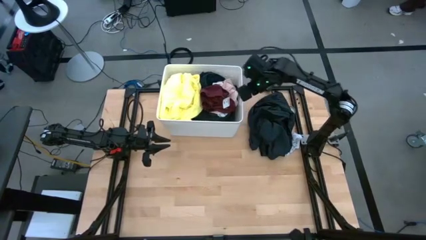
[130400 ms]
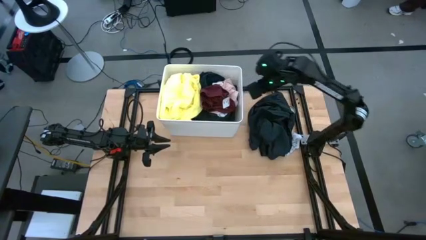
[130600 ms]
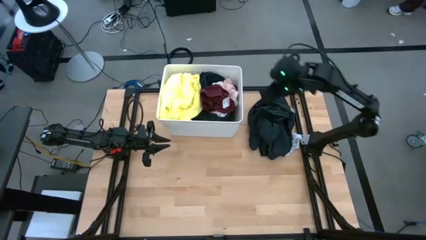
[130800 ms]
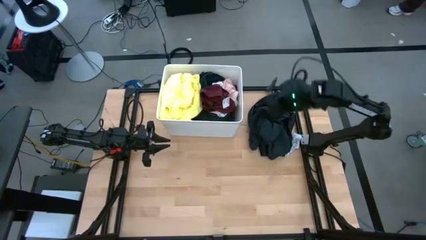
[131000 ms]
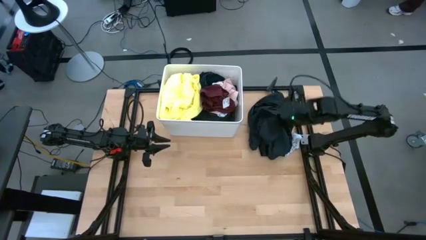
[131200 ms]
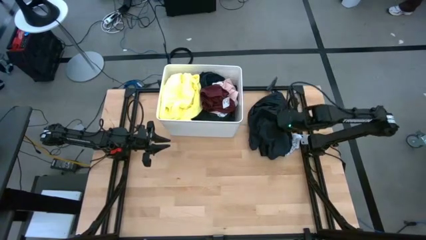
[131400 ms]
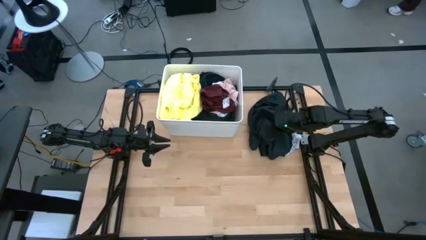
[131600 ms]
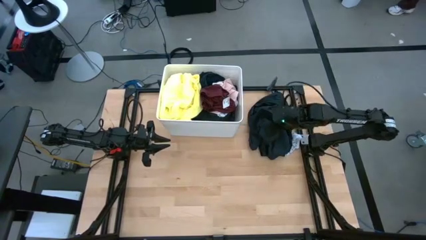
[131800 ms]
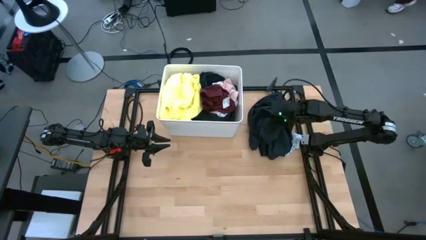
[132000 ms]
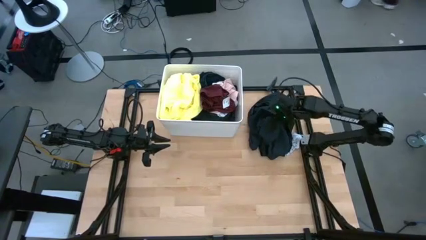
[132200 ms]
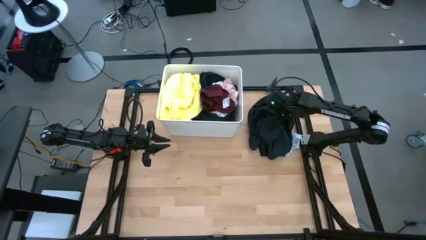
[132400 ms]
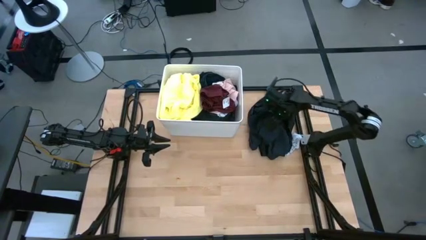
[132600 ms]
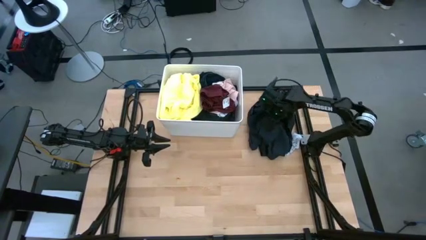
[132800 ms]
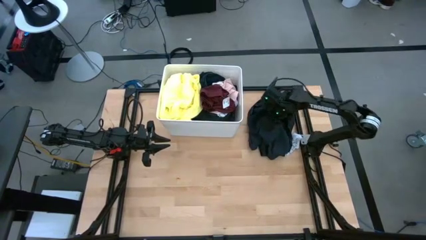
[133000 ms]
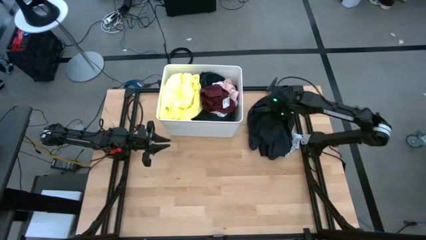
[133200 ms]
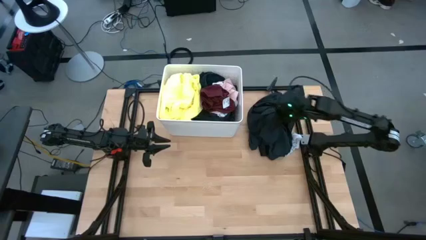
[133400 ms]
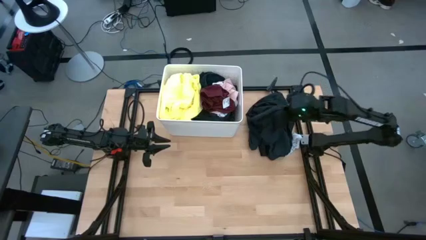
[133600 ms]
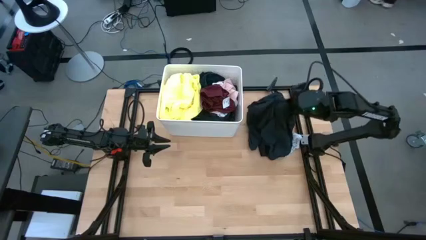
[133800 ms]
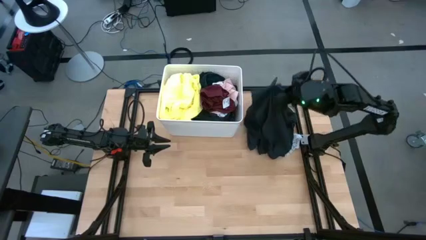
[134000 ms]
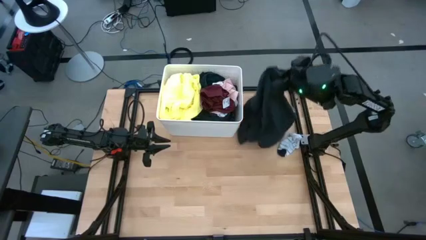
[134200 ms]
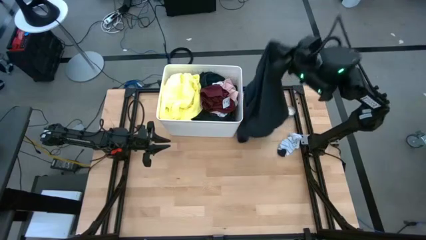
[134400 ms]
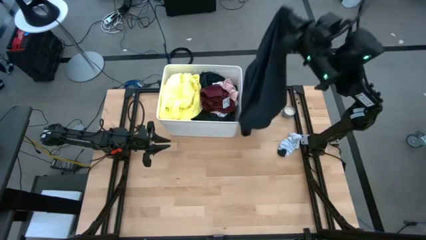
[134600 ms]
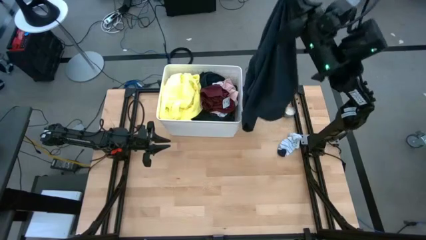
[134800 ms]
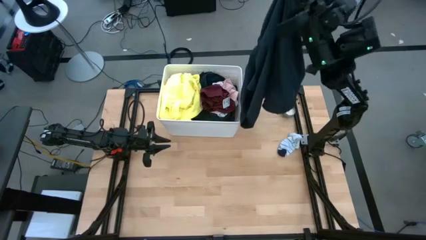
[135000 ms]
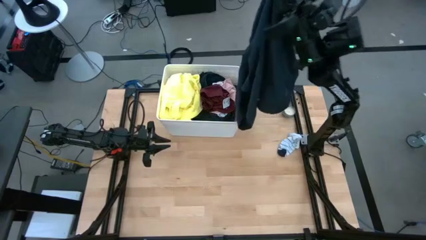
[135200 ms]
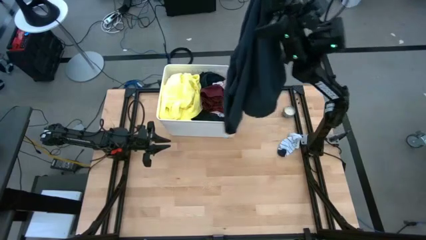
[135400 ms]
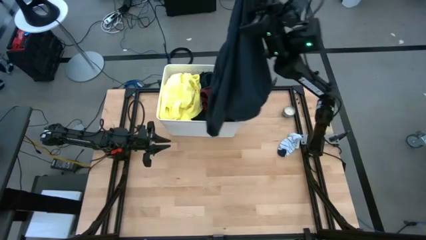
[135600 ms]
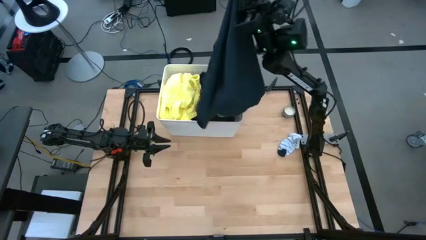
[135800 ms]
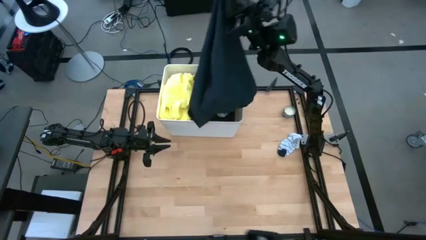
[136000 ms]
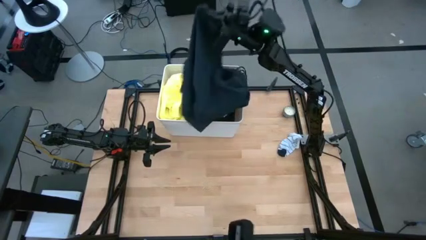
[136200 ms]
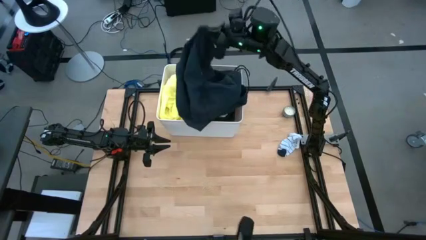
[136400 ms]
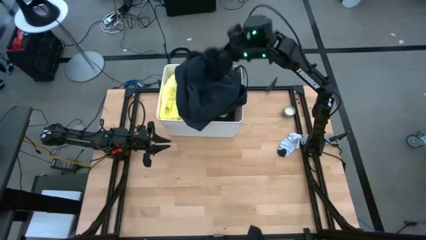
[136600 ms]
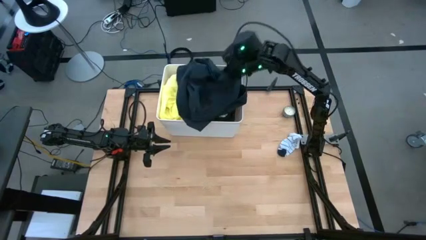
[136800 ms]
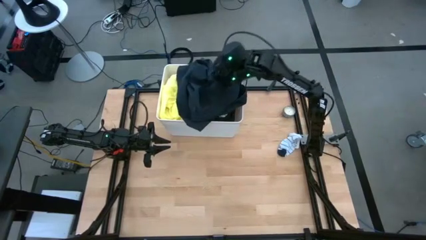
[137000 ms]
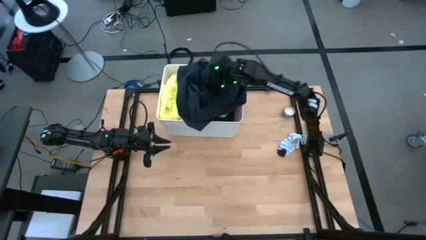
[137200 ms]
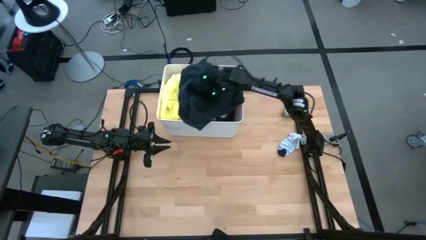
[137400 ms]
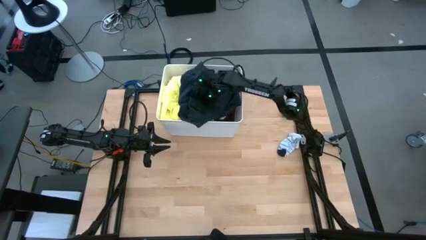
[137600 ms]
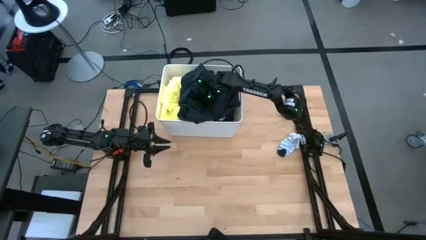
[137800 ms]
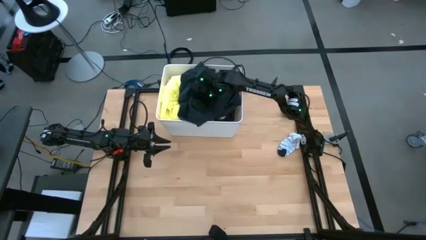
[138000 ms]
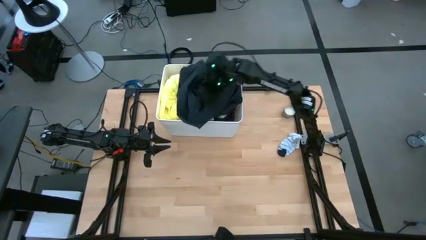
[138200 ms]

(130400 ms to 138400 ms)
Task: Sort clothes
Put the dark green sports shorts into the laundry organizer

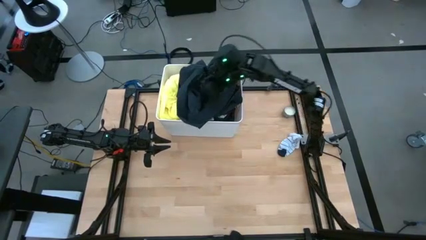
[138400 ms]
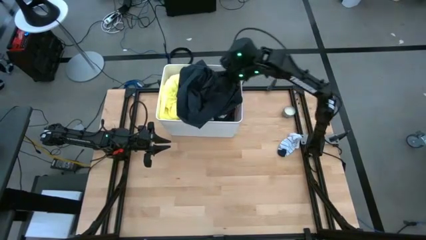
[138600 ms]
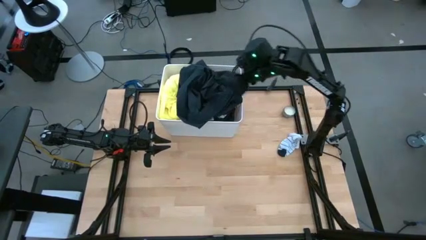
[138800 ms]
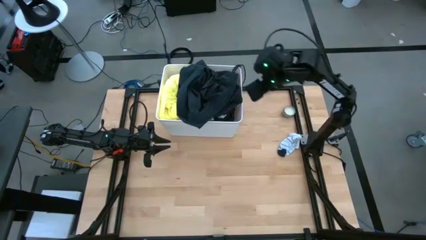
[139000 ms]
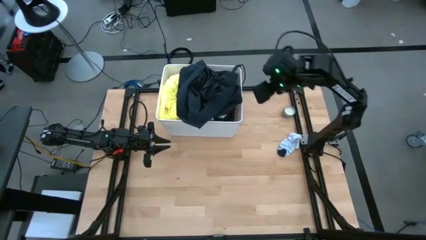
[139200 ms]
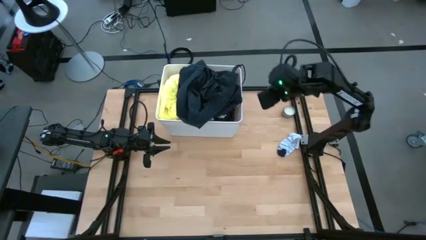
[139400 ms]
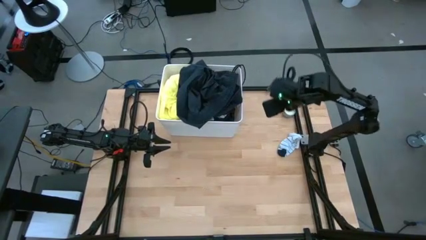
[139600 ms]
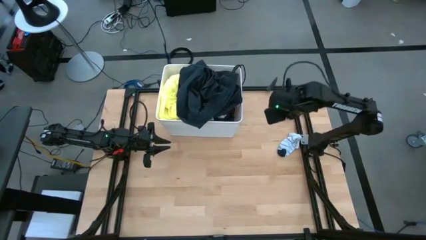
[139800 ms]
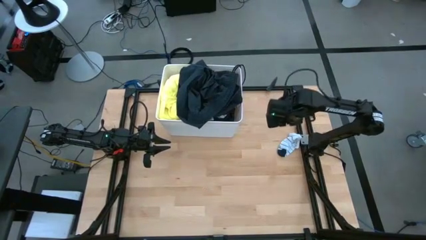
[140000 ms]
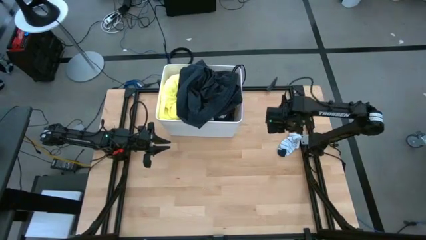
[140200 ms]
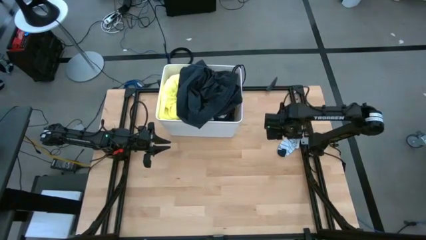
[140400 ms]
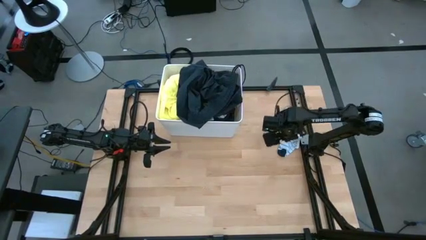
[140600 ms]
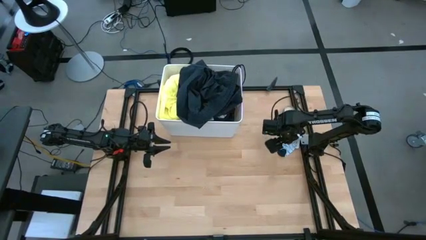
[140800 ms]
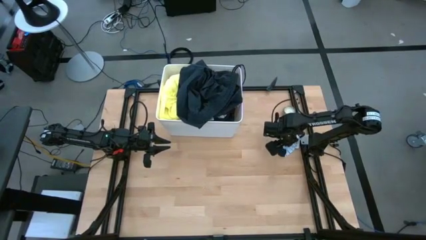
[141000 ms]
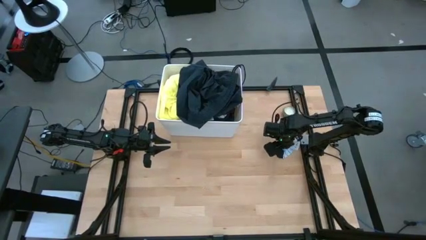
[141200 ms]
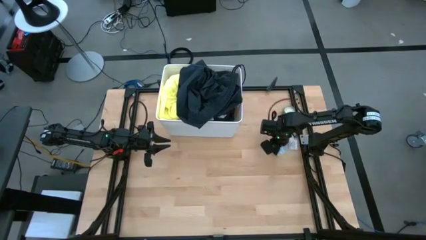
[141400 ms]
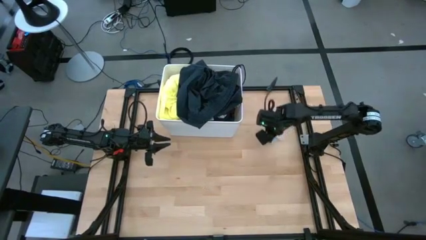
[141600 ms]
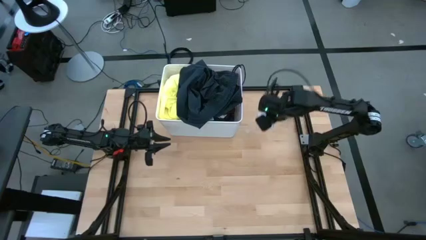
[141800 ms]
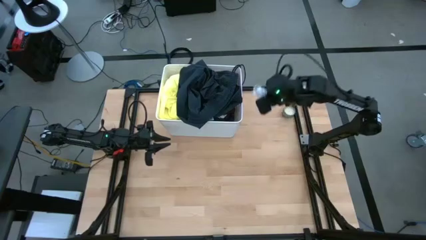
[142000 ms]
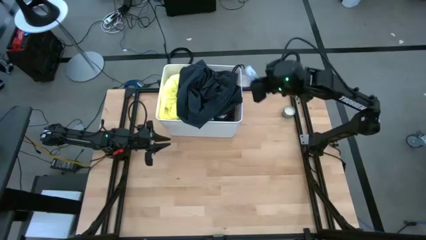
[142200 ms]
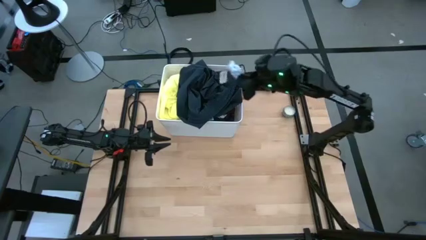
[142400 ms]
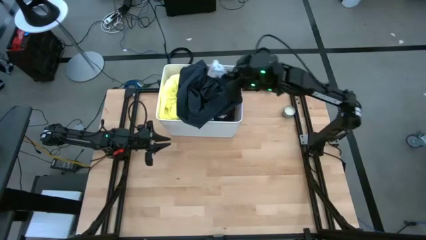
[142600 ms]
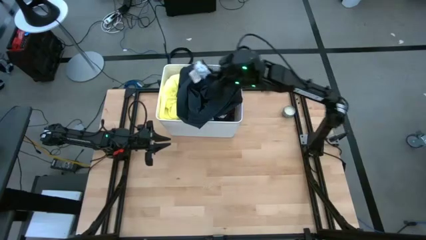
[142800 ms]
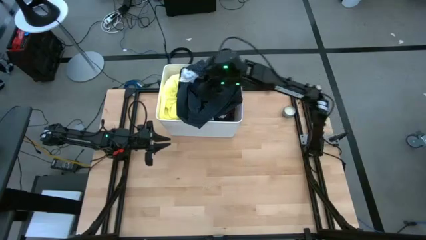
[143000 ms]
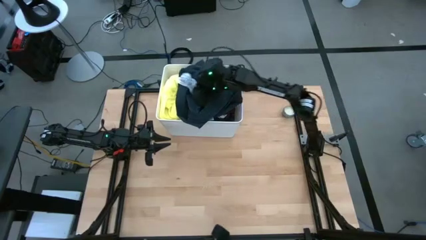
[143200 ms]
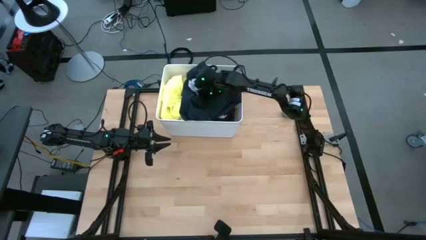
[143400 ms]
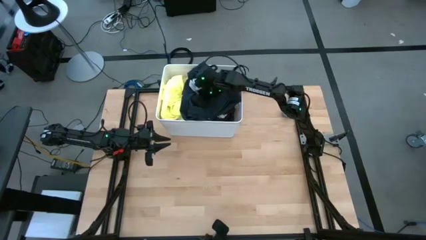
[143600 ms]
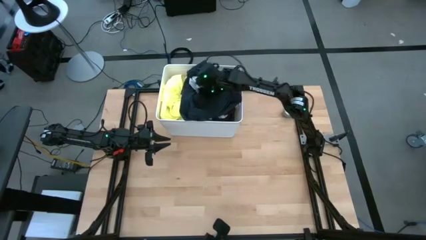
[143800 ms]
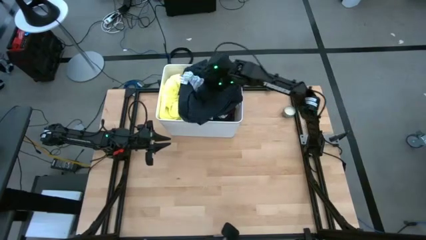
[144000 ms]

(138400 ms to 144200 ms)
Put the white blue socks into the laundry organizer

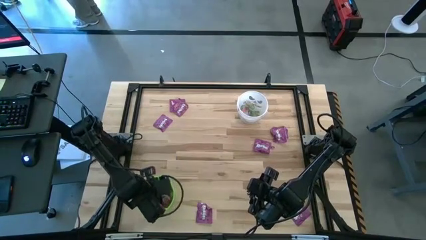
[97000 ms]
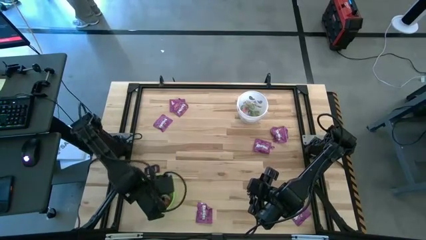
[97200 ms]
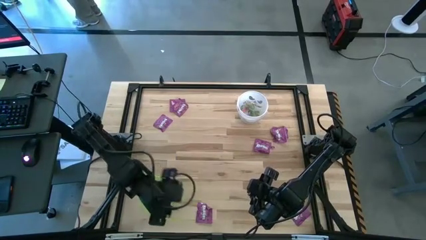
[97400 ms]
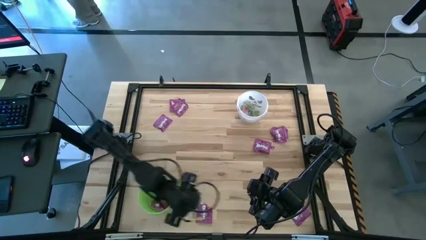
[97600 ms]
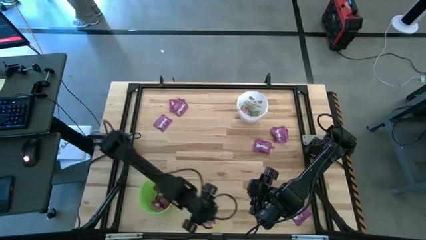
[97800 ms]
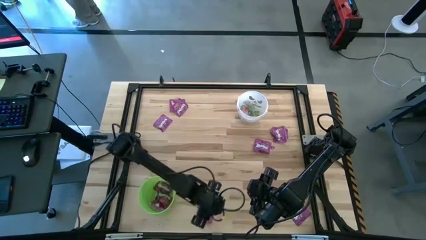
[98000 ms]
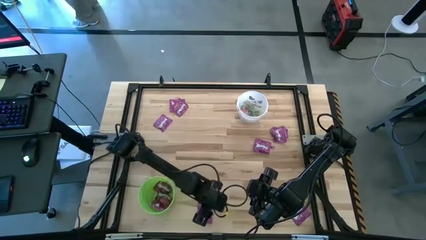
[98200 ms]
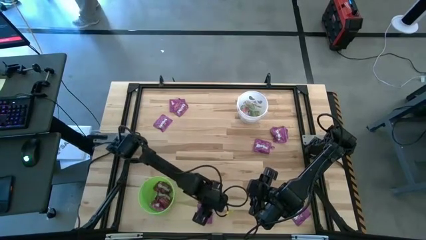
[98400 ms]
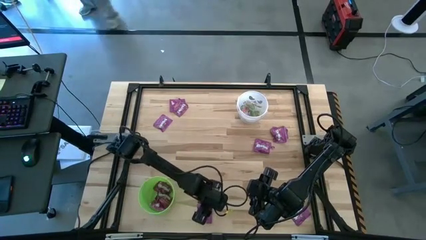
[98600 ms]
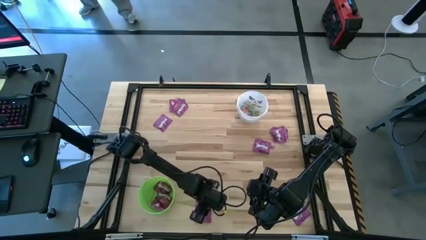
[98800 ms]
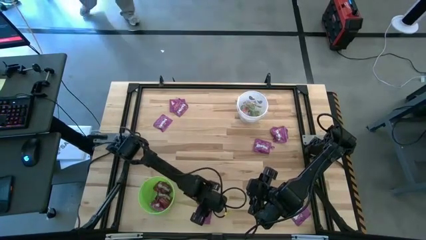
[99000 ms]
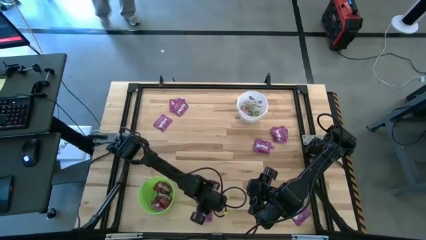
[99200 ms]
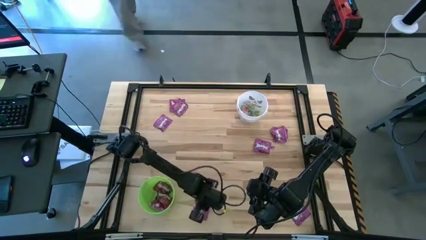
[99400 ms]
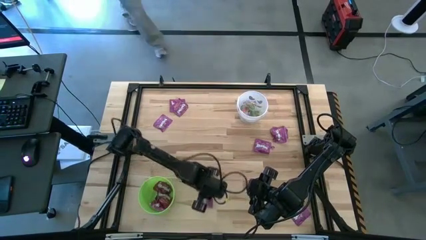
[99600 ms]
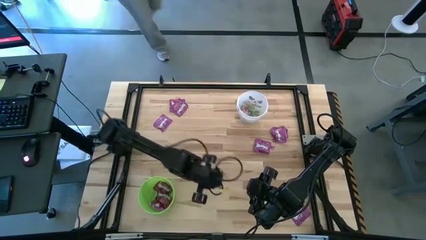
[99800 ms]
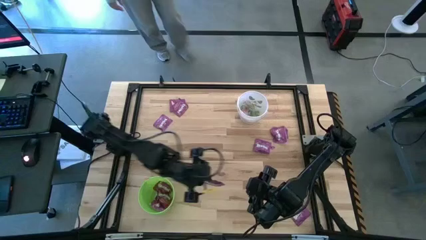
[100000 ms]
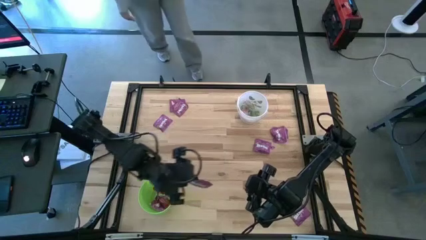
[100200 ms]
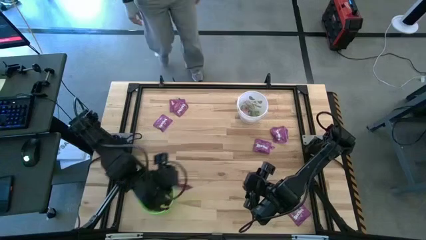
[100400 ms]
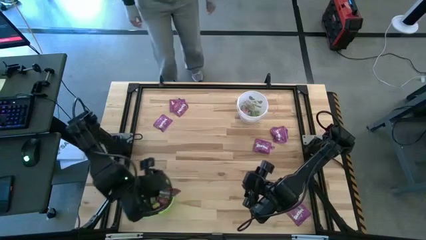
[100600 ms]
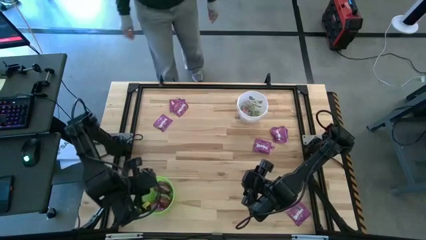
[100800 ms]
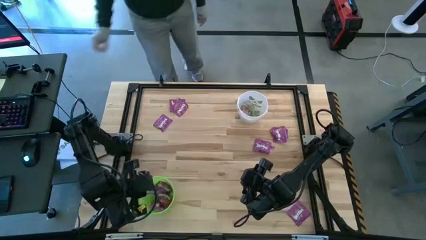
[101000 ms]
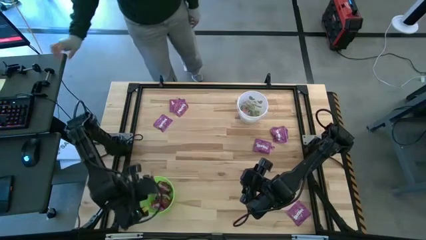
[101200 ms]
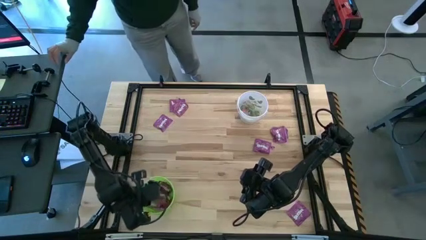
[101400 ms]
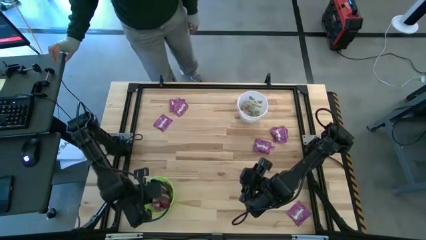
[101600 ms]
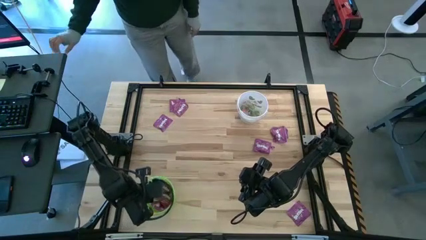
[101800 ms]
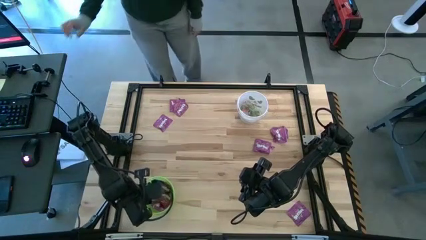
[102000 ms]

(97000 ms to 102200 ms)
Task: Sort candy by brand, put in halloween buckets
Put the purple candy into the green bucket
